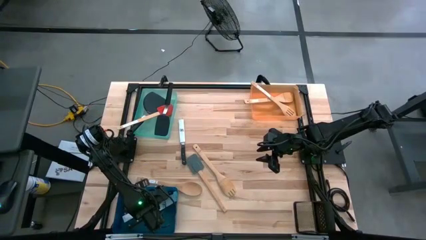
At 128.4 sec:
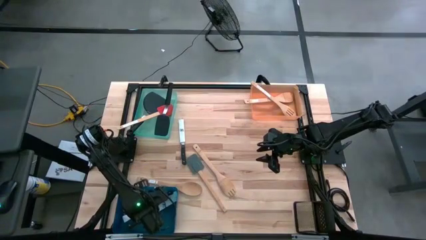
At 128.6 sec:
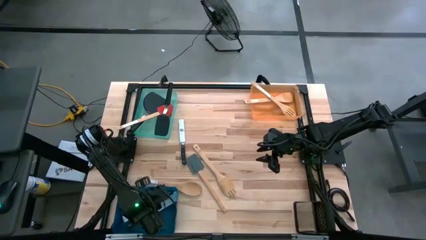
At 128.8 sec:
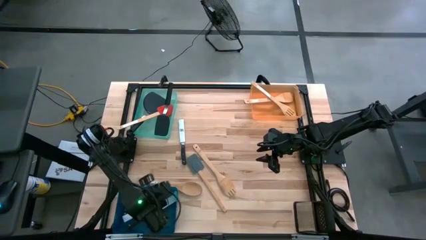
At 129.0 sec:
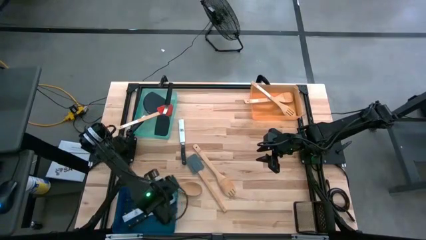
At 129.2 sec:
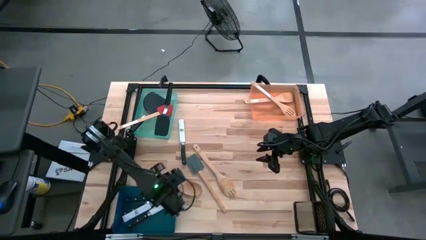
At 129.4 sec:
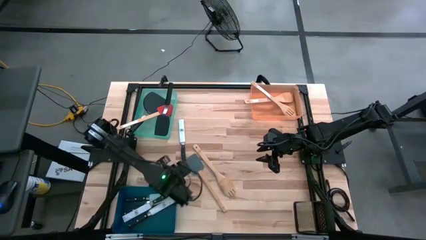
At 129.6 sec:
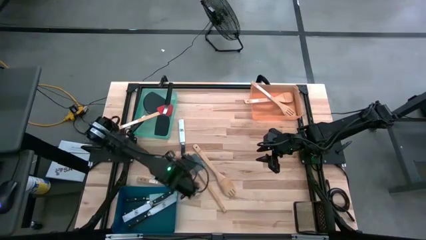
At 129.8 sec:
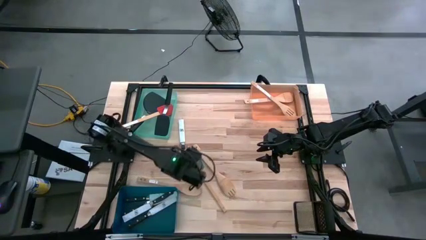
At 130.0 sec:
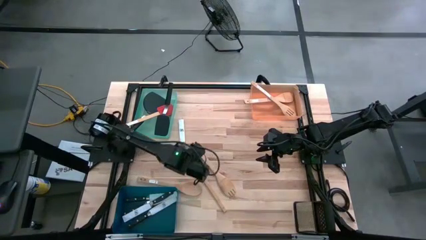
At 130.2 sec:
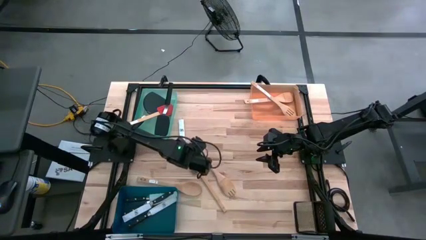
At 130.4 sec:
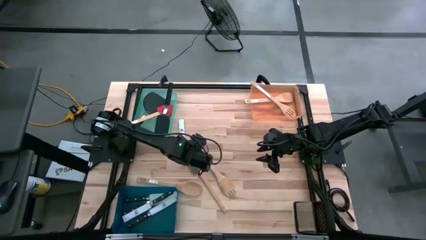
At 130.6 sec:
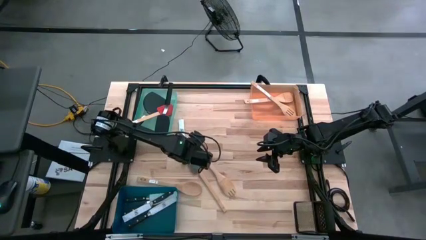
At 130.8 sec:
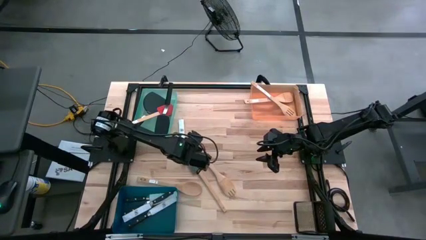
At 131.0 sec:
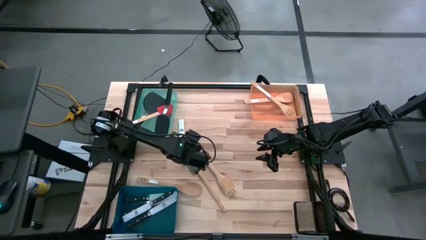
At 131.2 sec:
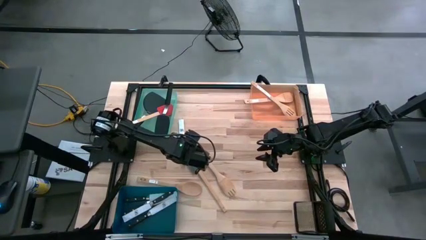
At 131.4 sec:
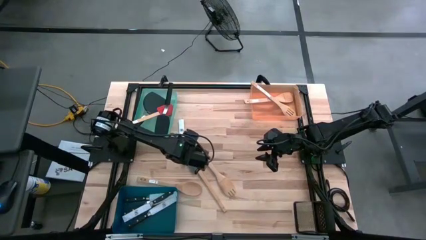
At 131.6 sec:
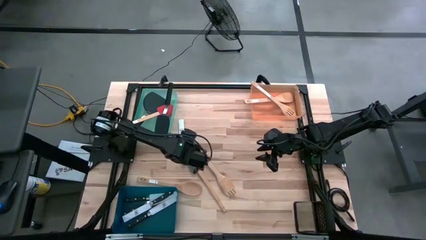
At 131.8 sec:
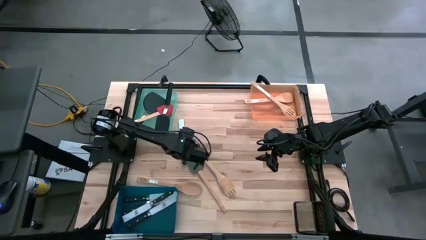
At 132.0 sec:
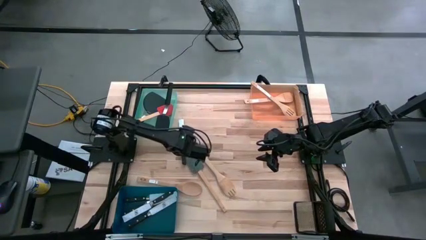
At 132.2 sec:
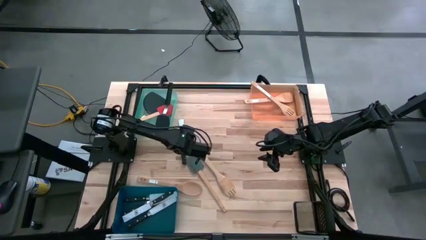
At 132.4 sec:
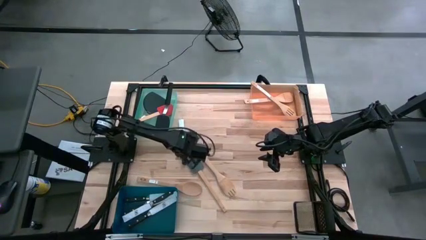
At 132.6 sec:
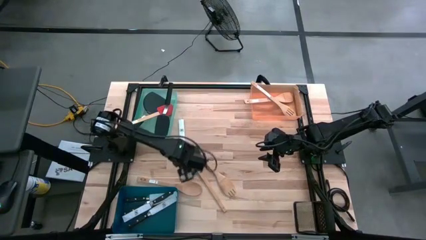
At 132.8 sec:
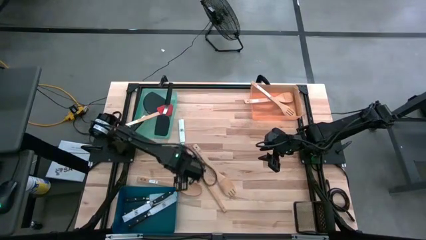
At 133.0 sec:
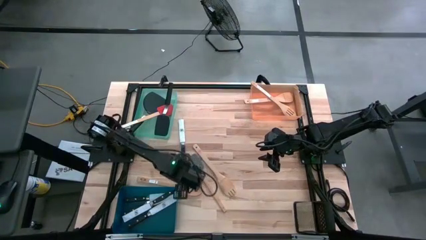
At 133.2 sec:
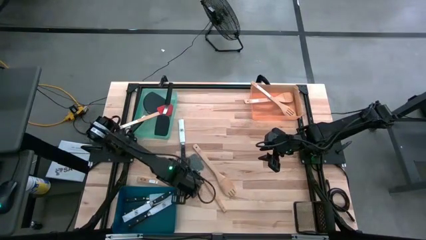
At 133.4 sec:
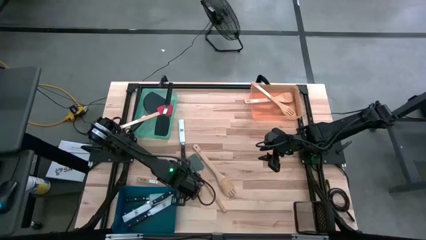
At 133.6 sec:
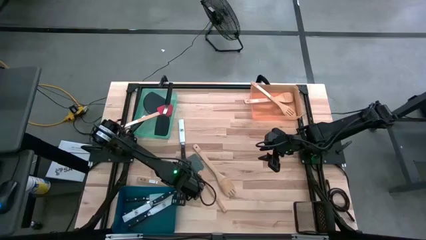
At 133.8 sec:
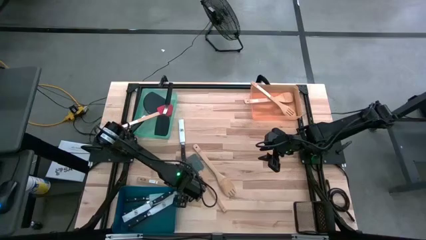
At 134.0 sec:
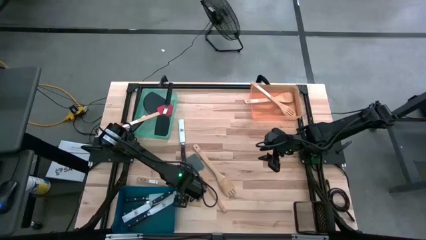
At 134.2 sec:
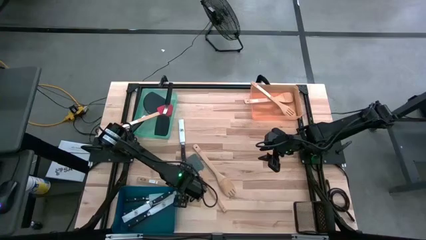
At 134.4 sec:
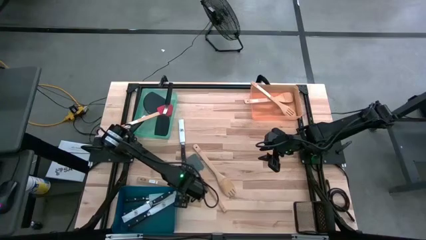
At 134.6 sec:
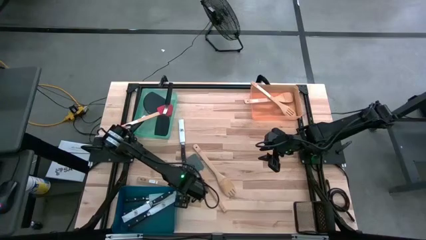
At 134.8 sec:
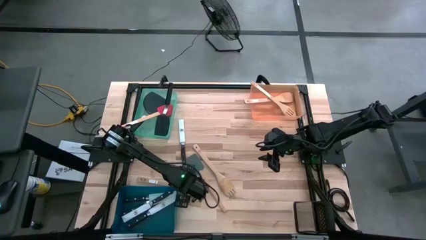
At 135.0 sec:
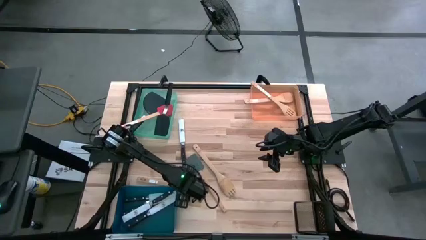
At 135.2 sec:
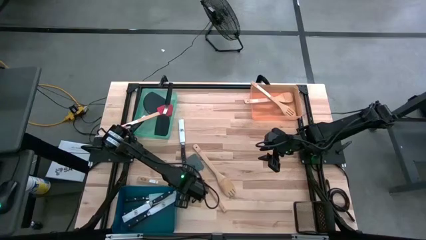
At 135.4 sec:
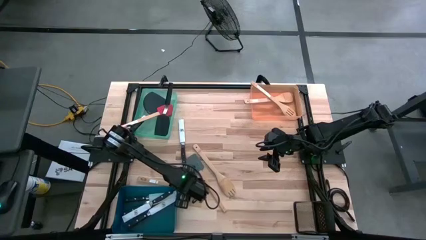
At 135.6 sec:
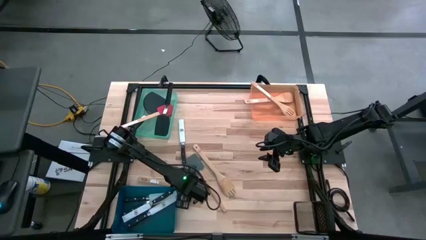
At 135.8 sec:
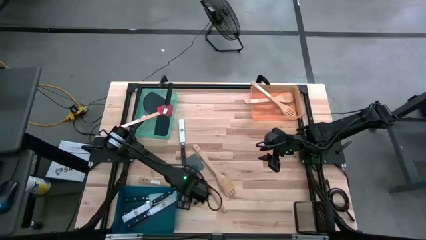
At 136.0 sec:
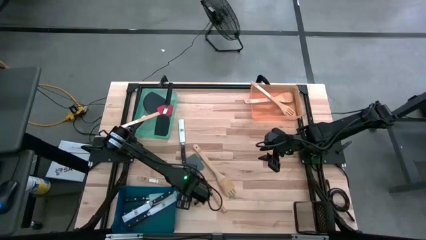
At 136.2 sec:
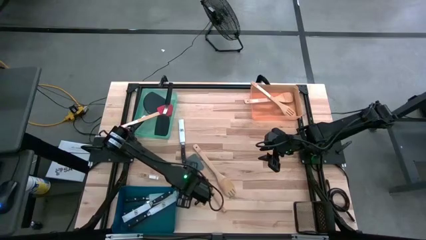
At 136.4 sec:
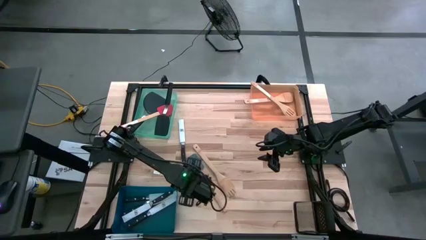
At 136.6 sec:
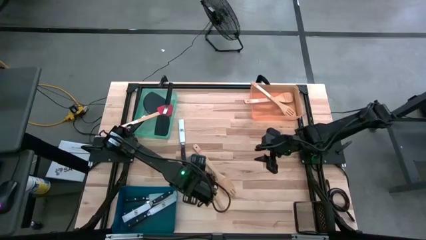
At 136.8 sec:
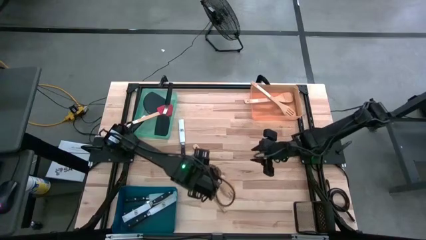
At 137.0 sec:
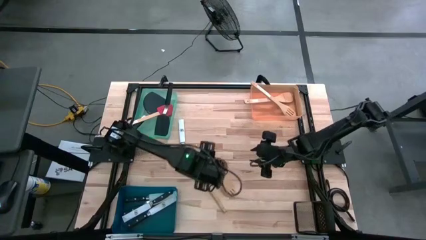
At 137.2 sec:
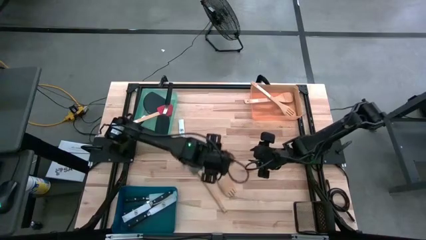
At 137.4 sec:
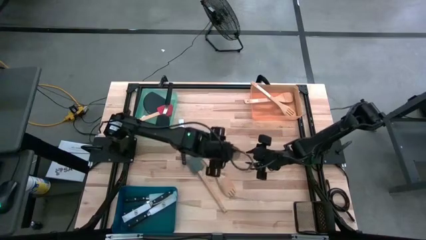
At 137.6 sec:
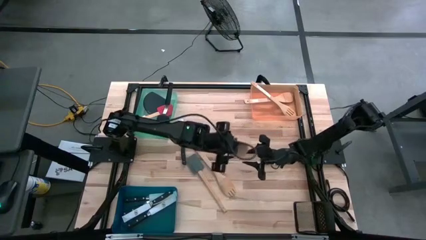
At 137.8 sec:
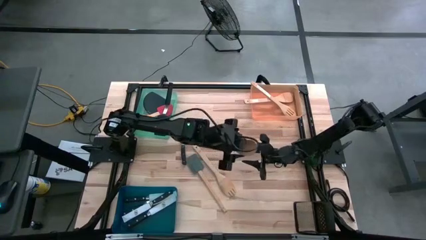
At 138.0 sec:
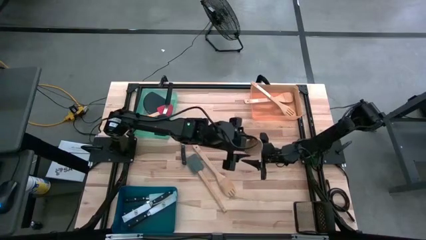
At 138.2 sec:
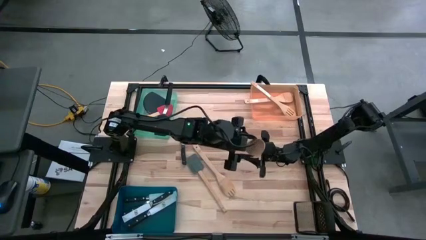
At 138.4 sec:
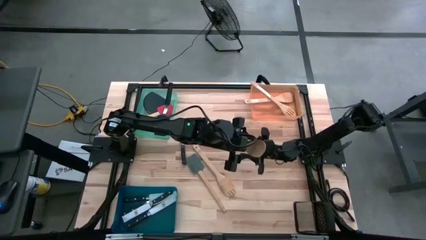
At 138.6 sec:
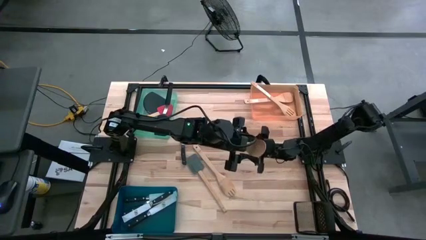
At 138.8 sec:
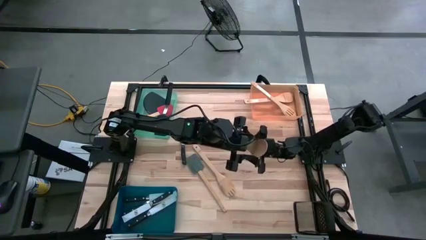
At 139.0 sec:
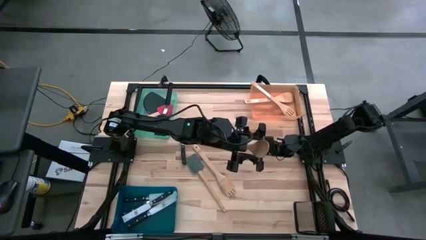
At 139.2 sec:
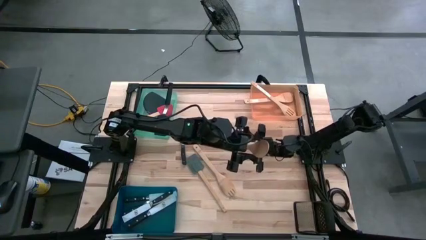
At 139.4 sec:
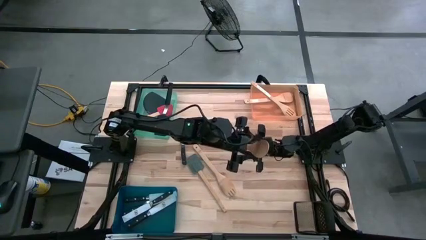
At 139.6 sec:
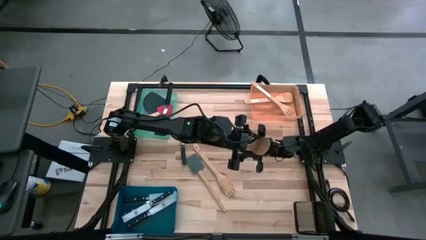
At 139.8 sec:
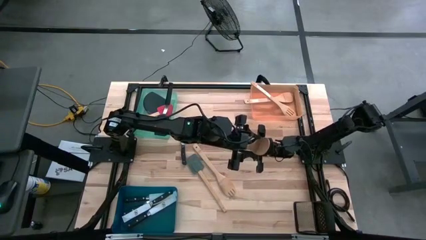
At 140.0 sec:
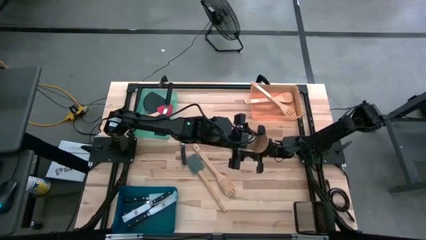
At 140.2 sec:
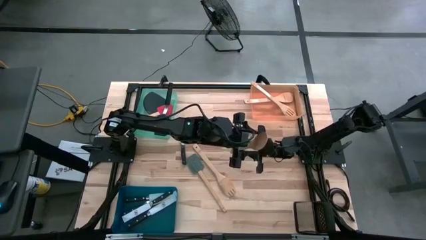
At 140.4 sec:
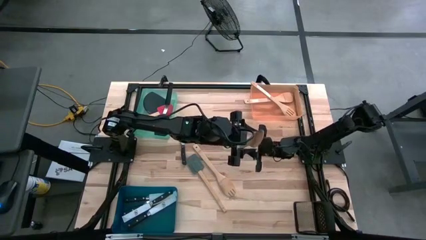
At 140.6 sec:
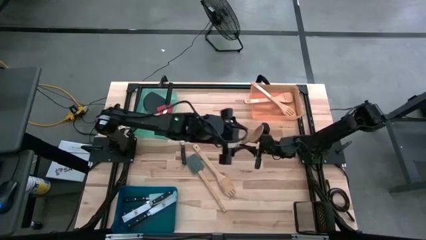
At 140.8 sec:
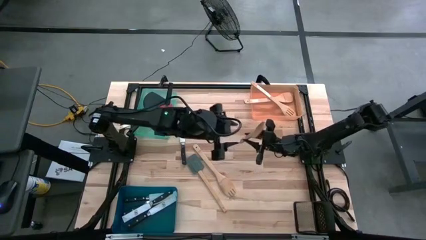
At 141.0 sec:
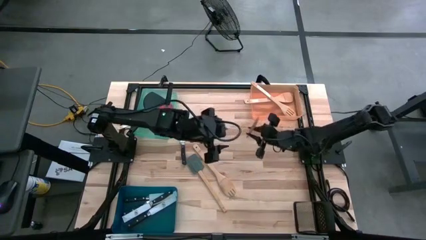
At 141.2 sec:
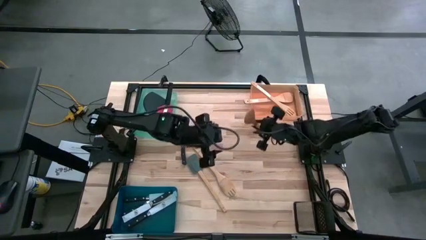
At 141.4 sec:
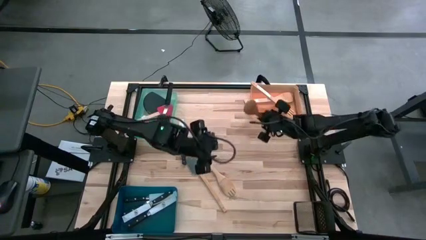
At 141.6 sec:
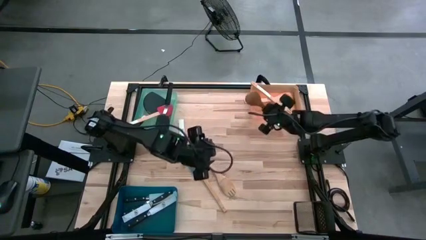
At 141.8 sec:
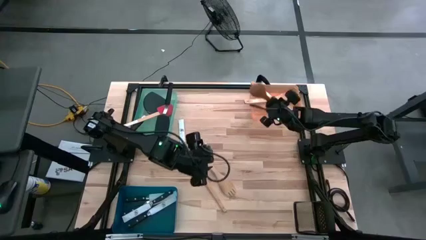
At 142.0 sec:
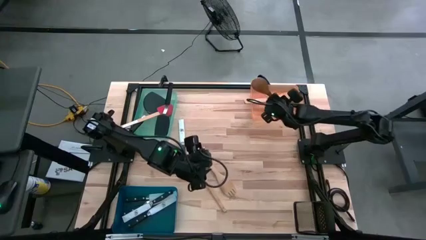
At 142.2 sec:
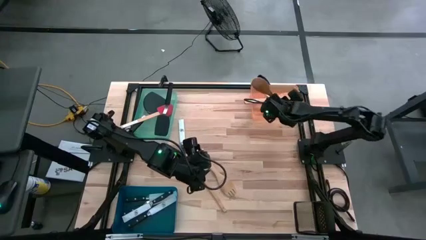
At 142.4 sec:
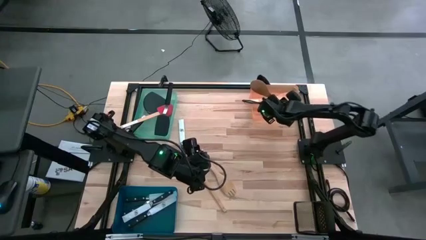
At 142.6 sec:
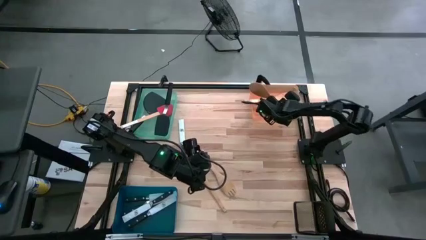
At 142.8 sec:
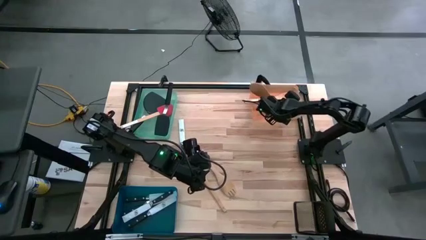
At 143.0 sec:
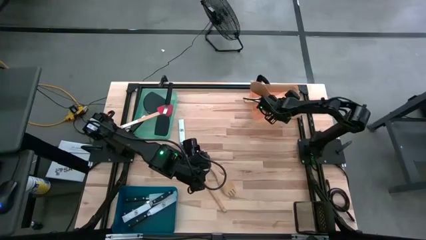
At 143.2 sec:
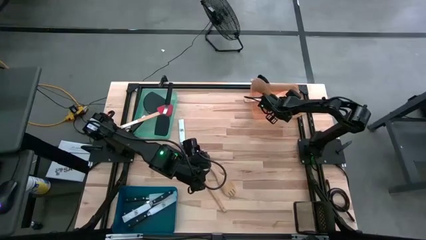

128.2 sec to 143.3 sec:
Task: Pick & Place Kitchen Items
Put the brown wooden serving spoon into the orange bin
